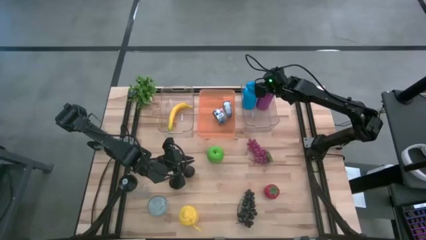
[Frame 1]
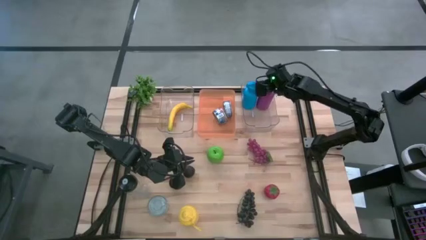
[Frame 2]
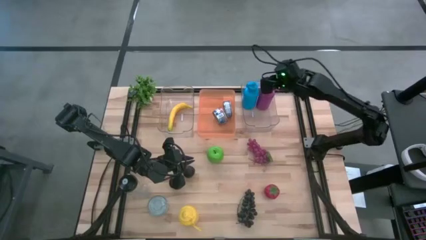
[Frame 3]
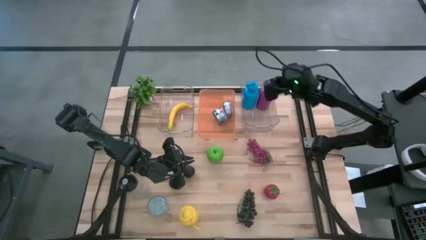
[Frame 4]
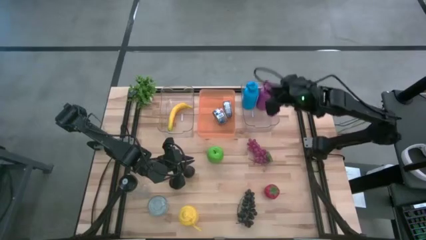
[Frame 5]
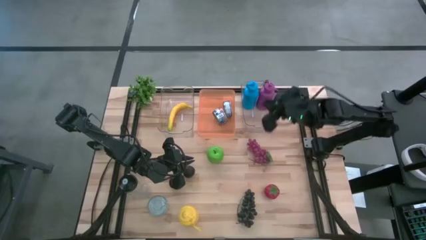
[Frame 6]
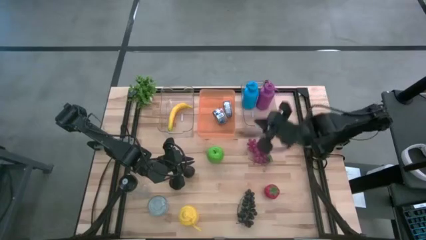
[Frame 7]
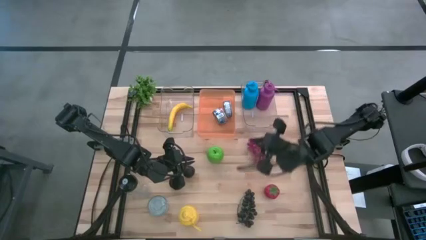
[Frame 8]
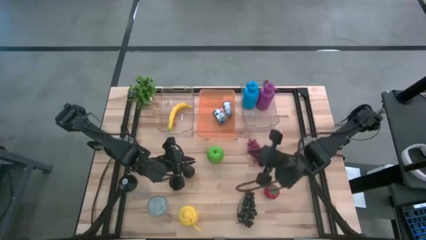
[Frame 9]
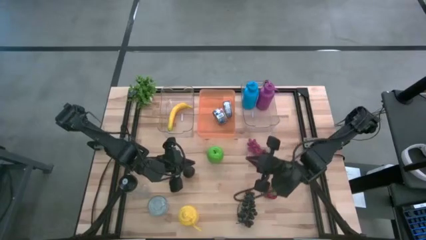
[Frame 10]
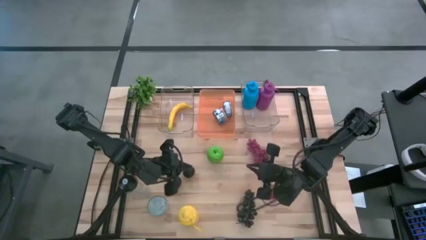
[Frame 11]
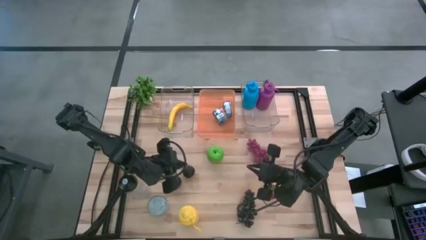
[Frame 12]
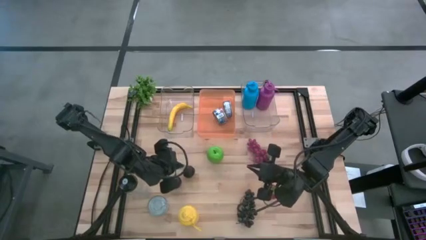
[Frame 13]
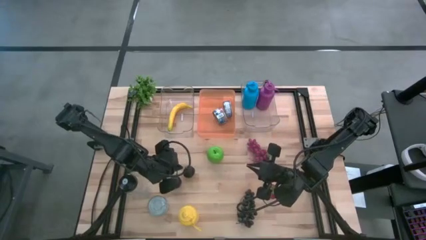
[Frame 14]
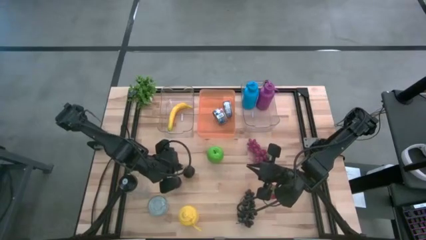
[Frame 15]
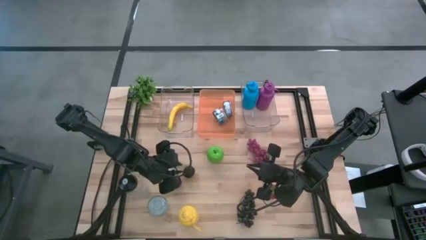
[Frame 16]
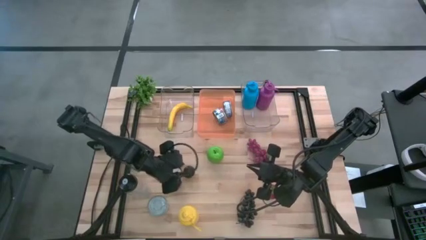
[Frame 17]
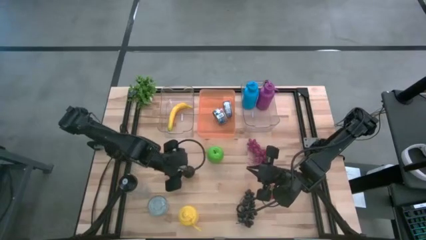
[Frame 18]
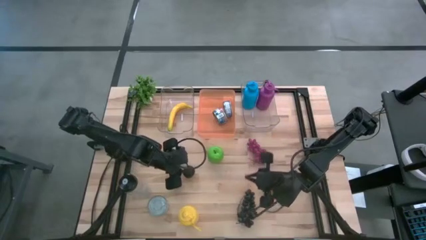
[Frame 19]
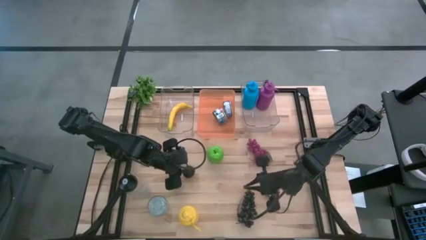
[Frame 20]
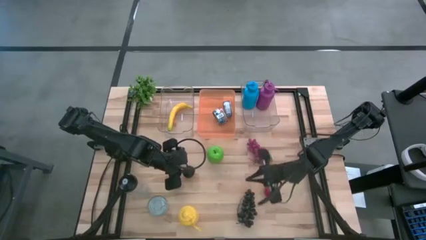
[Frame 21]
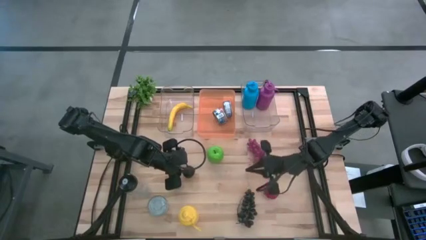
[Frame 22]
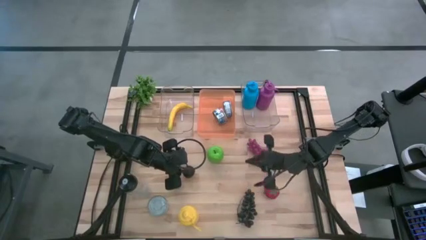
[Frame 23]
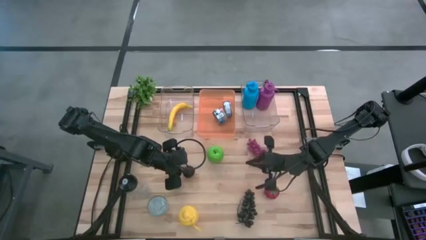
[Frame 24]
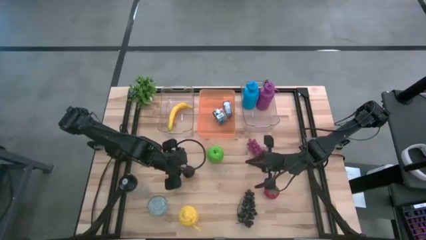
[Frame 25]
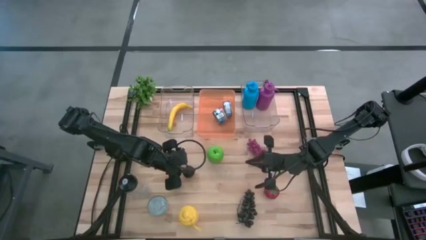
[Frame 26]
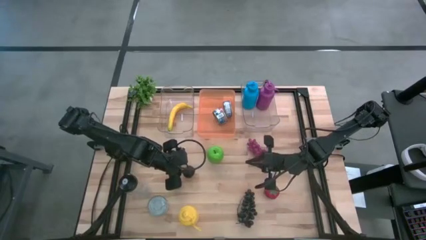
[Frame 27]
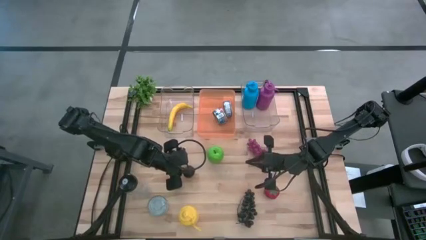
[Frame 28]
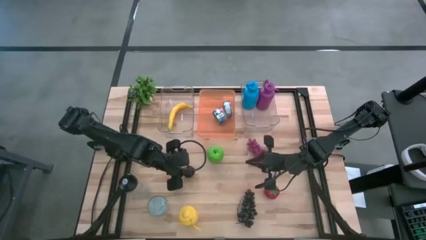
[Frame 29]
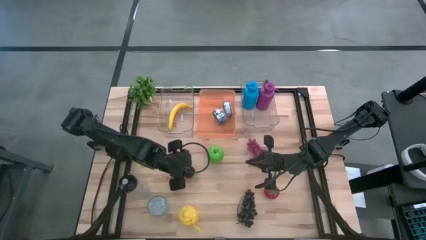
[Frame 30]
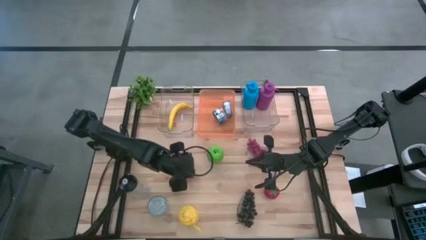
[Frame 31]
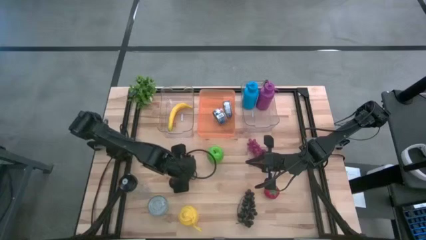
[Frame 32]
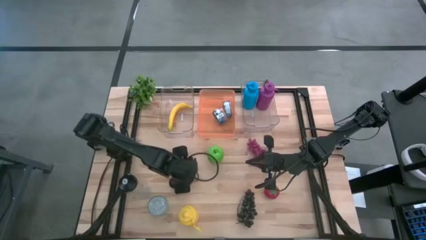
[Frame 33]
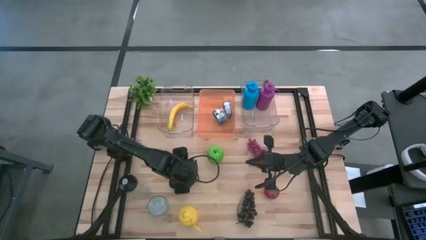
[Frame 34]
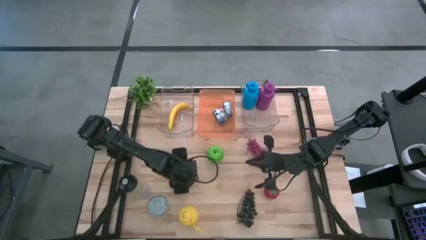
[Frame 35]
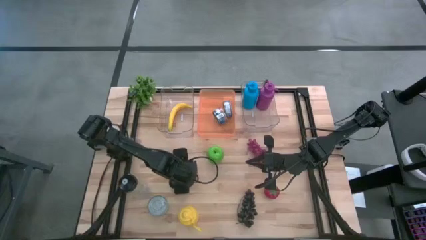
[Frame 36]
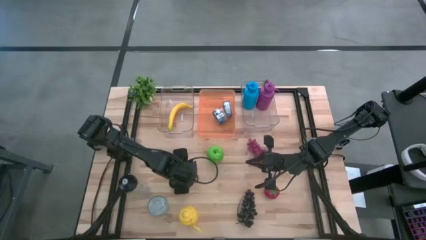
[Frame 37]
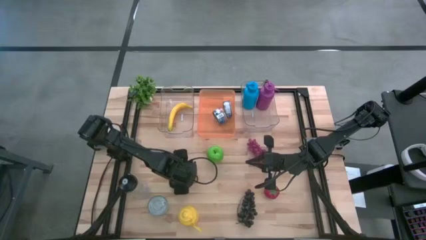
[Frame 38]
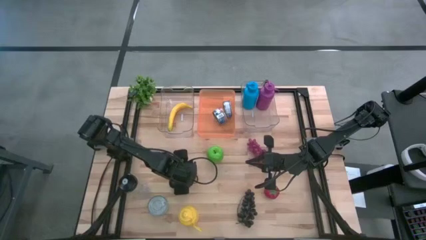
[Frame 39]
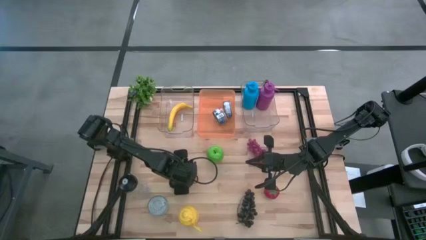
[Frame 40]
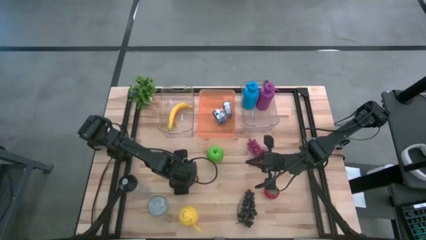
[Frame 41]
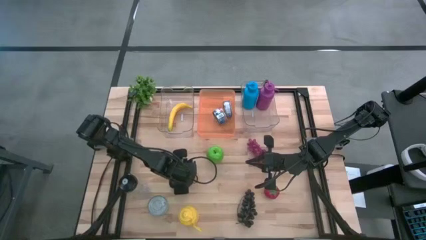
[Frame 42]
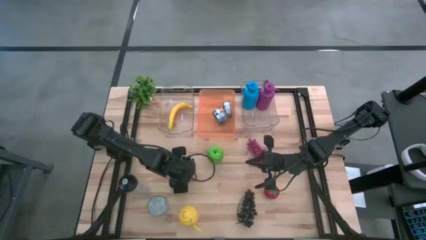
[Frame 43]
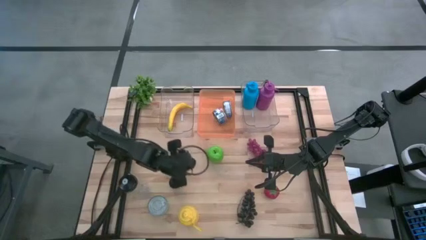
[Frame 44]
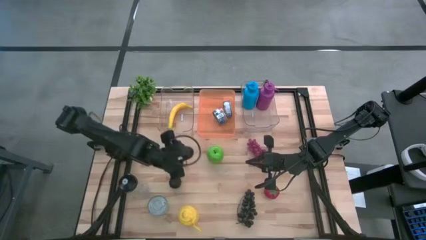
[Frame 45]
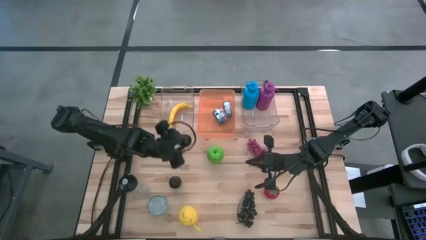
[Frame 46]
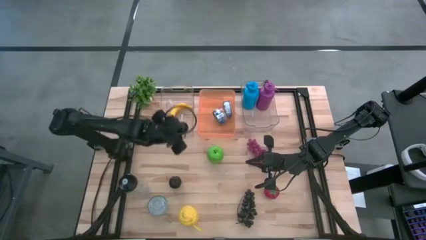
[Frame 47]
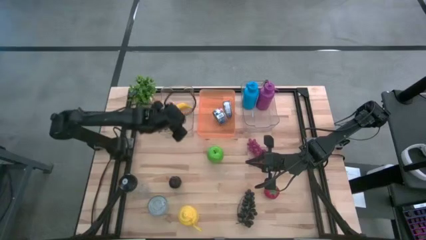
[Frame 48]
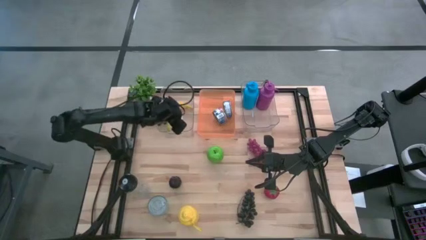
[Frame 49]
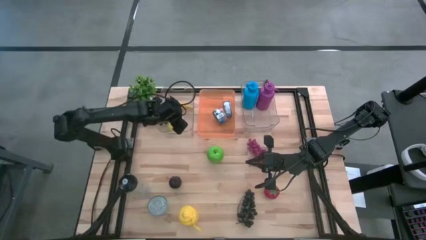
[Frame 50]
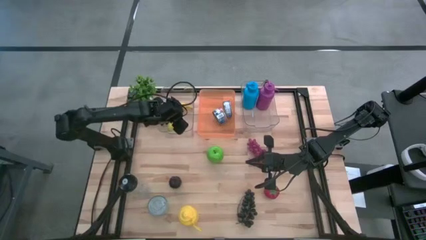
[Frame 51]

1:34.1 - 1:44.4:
Task: Pick & Place Food Item
Put the right black plum into the left transparent bin

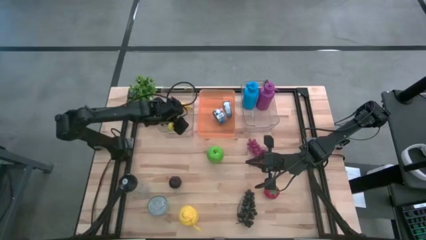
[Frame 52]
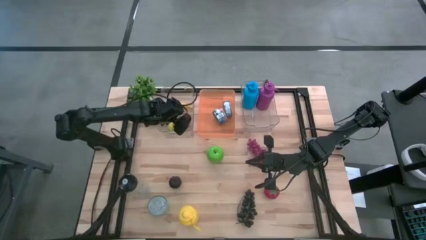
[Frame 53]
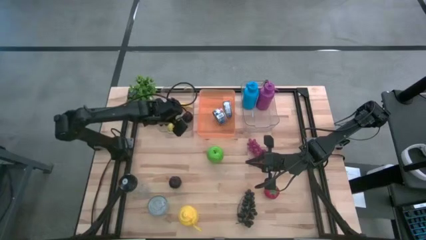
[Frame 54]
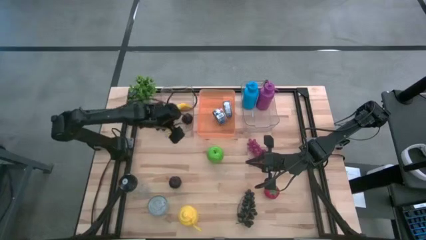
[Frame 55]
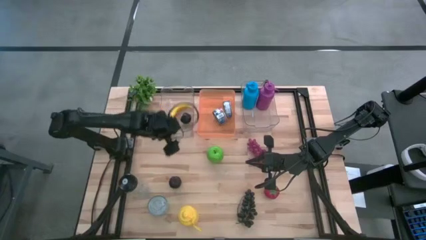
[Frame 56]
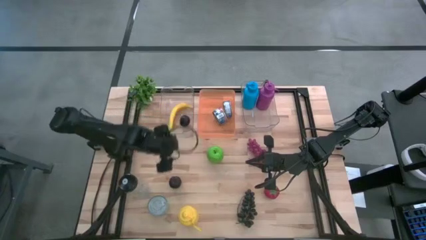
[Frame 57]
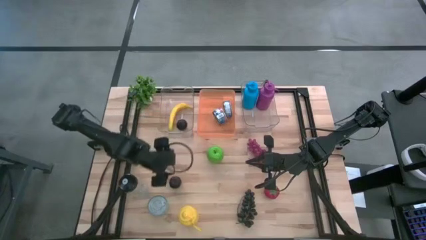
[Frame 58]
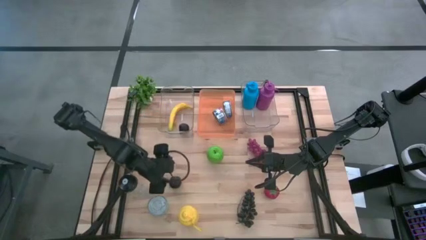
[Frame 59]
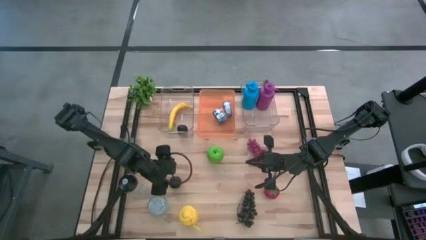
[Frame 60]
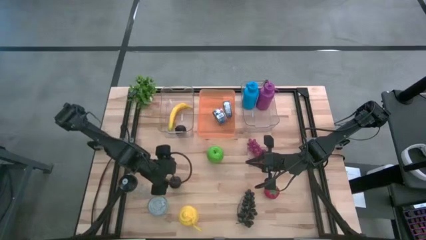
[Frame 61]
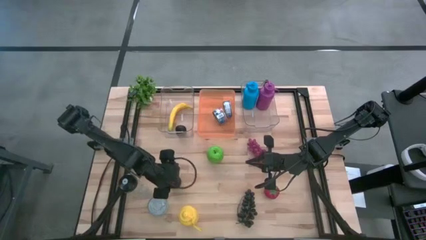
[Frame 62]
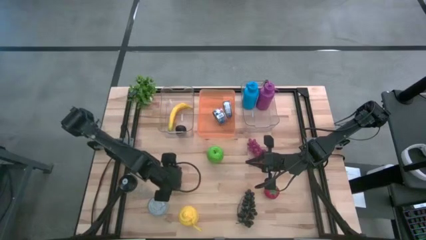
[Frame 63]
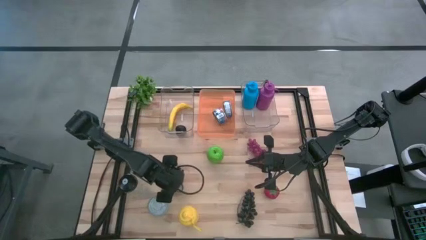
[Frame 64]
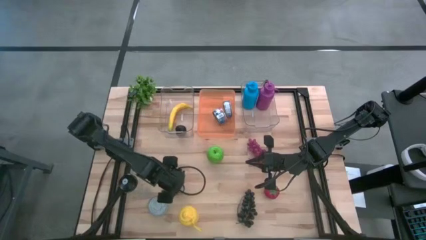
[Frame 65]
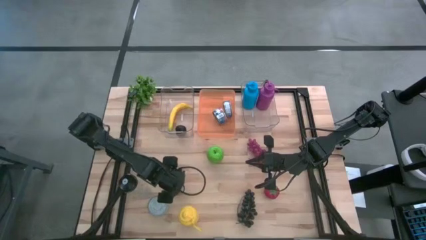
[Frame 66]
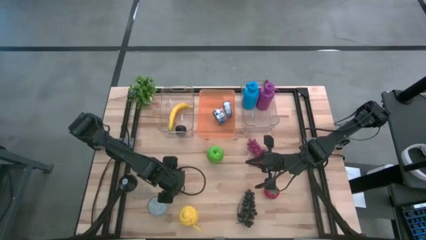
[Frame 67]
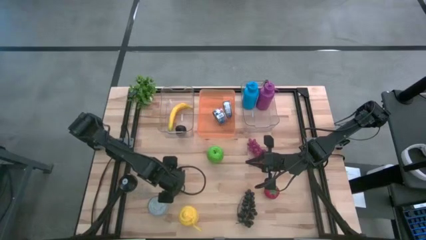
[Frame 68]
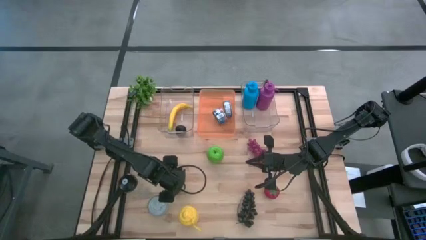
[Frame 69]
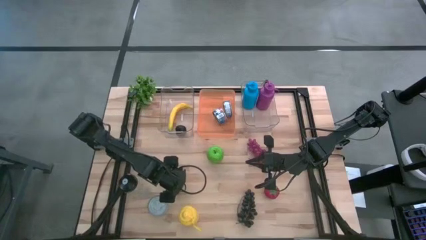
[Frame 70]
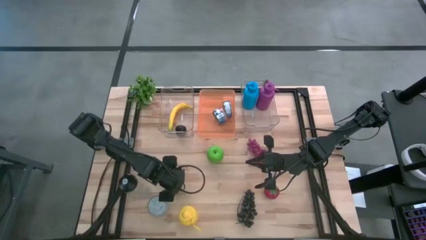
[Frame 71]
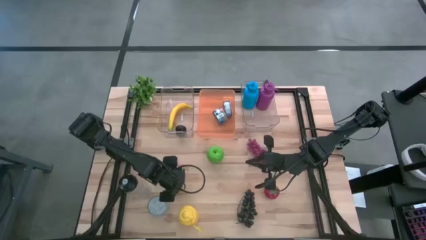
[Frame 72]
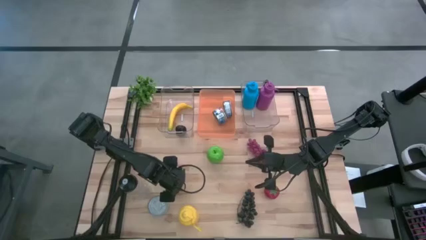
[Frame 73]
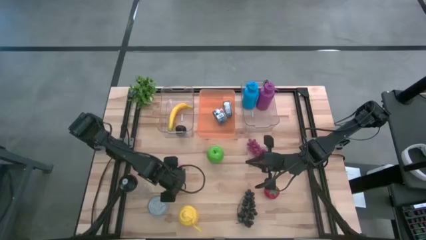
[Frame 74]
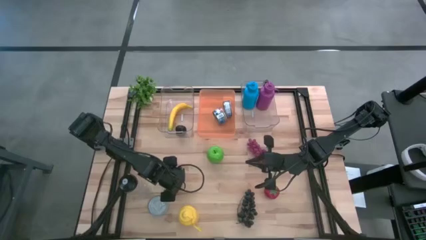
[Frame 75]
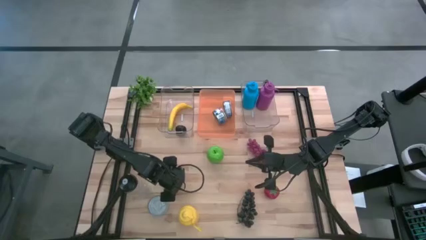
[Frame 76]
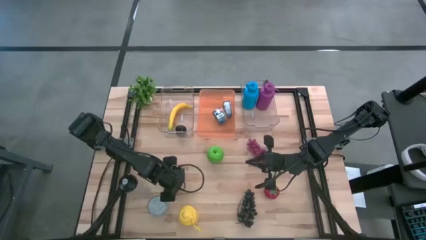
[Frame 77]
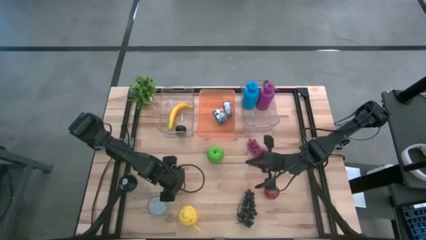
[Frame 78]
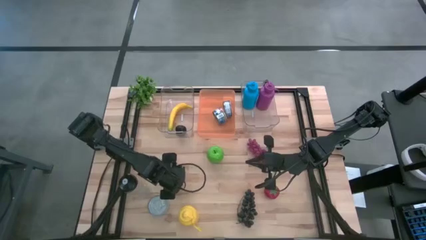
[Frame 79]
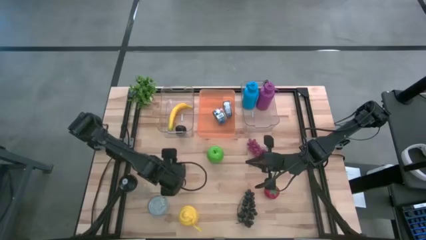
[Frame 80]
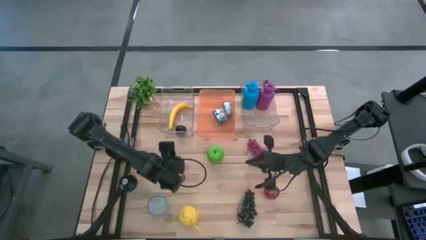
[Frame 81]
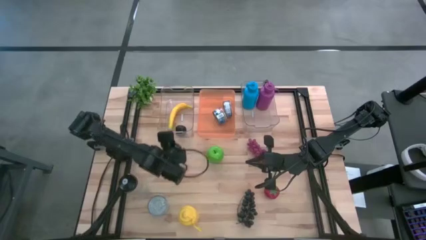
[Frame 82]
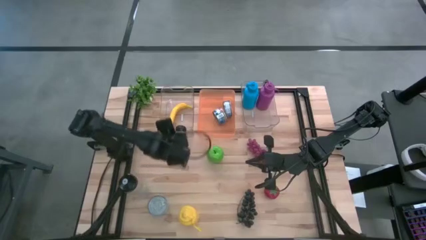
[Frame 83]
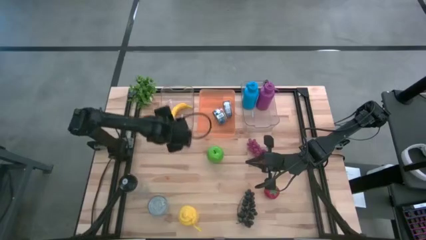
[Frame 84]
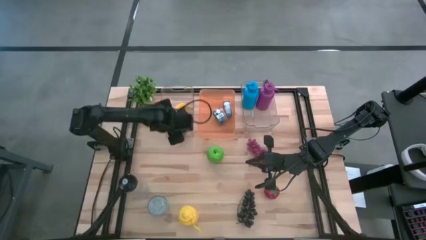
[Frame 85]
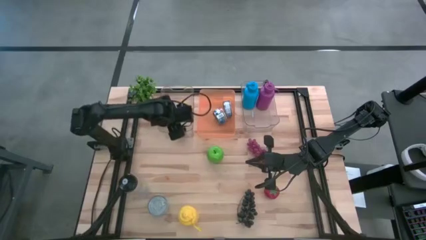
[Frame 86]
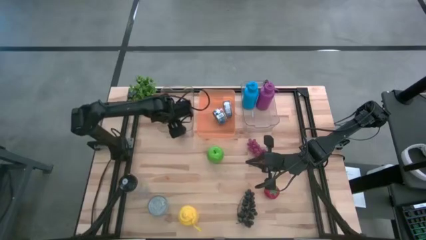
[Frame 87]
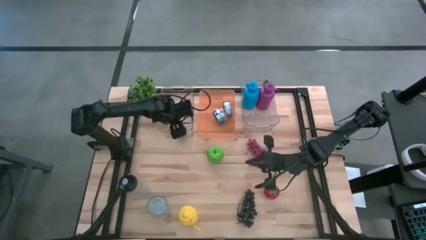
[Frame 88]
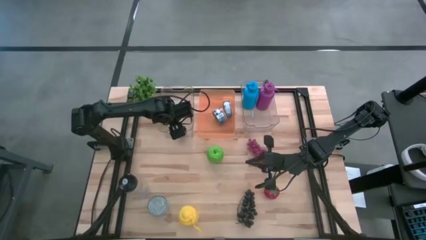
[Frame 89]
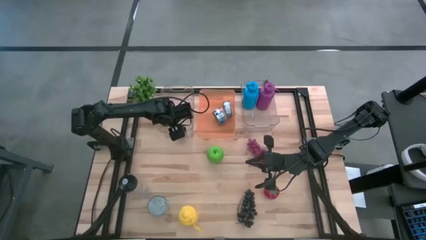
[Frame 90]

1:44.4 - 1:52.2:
Put the black plum into the left transparent bin
